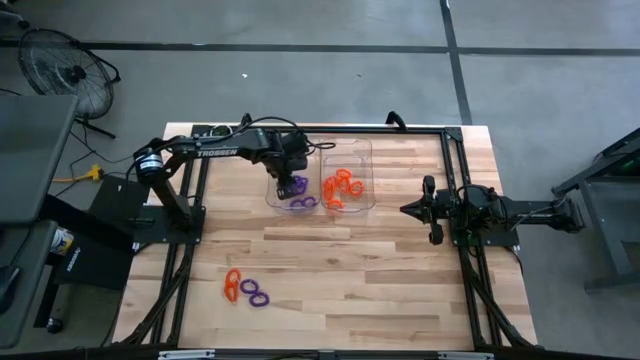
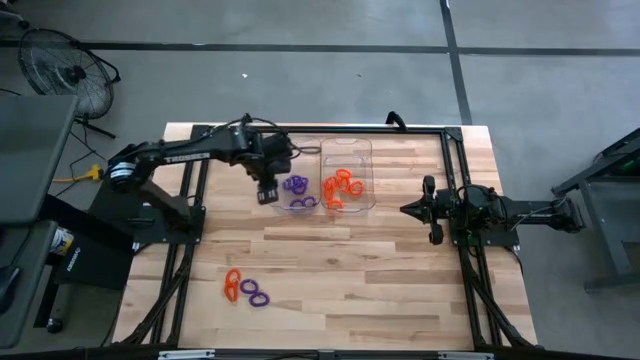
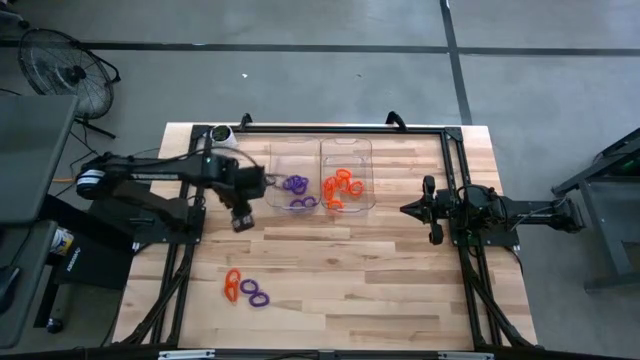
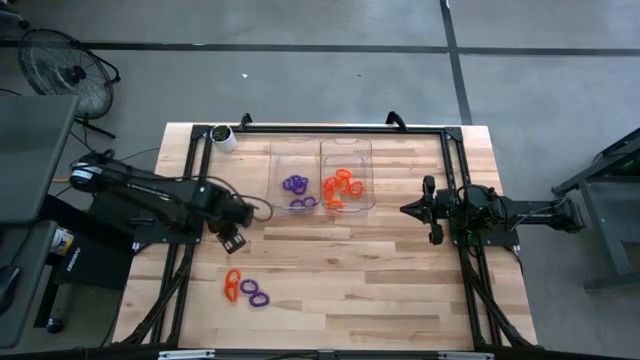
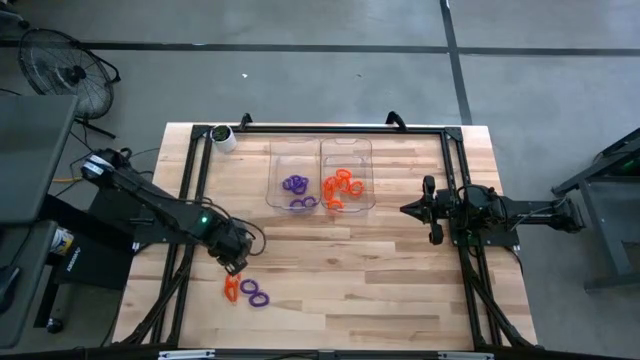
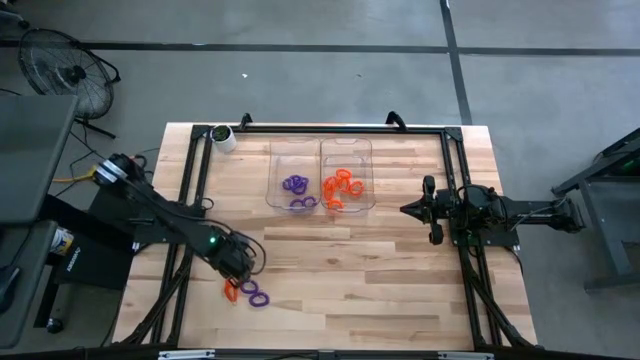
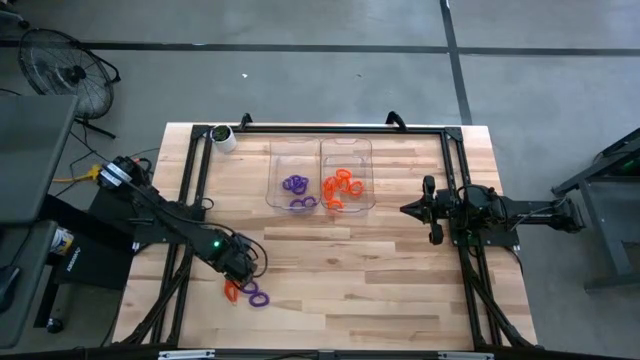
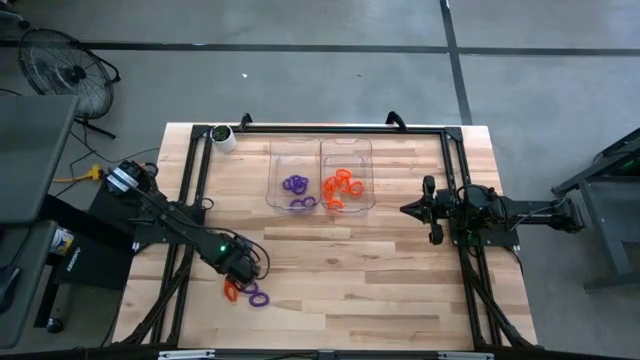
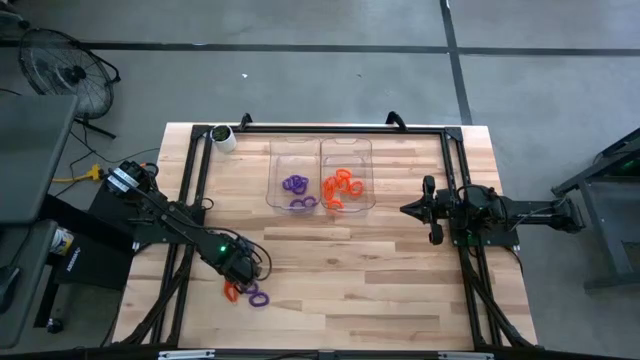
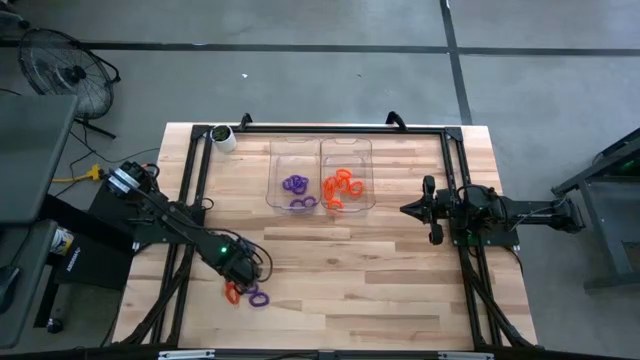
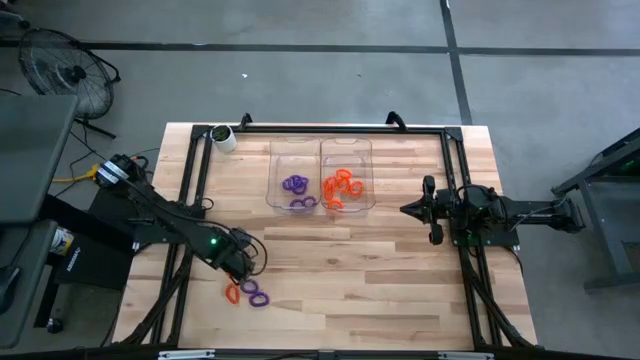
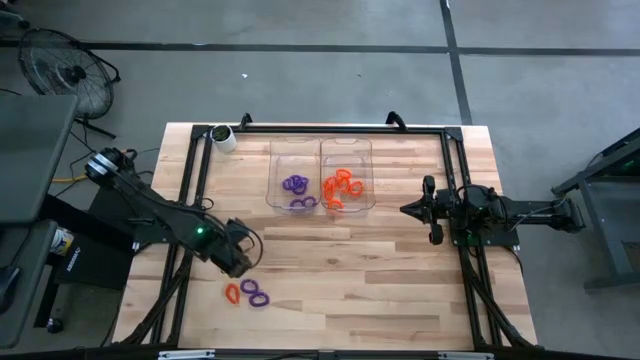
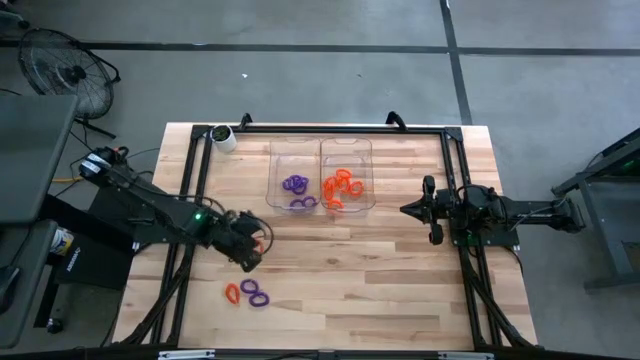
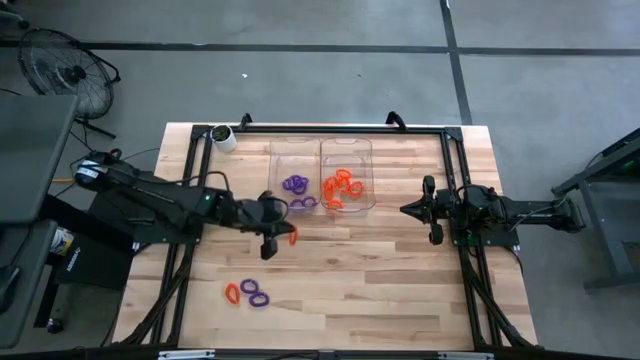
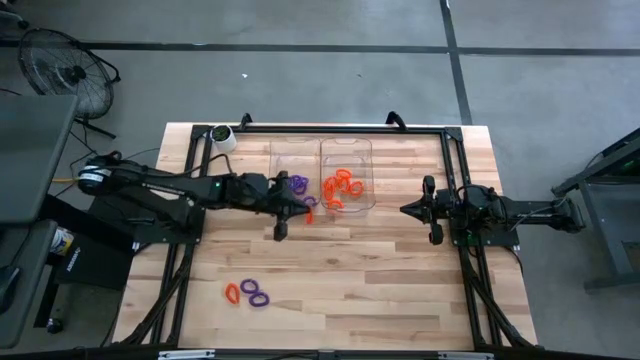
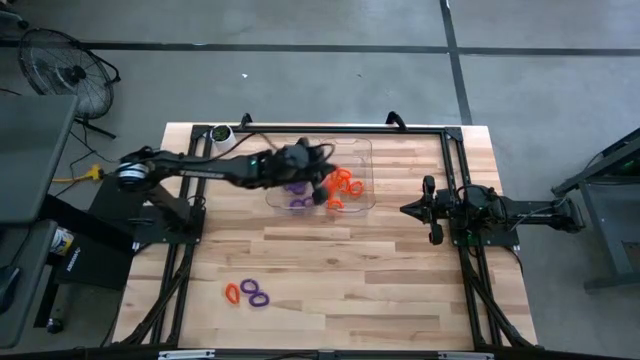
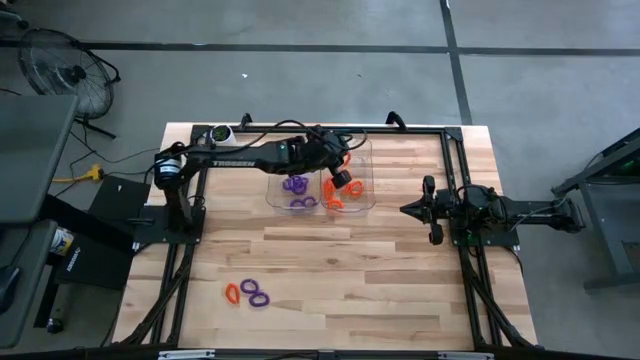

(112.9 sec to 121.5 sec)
Task: Sort spring keychains
Put the orange spring keychain into the right transparent bin

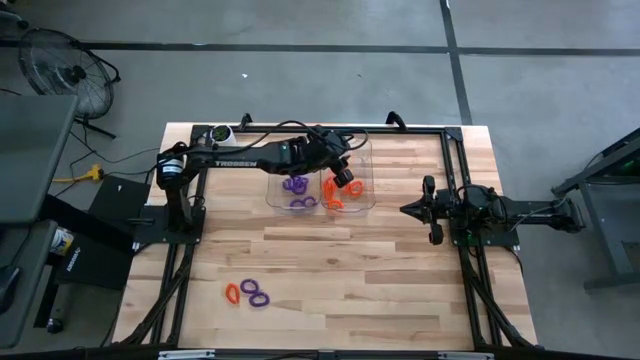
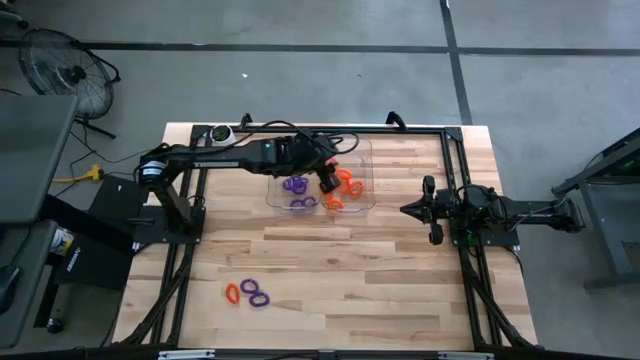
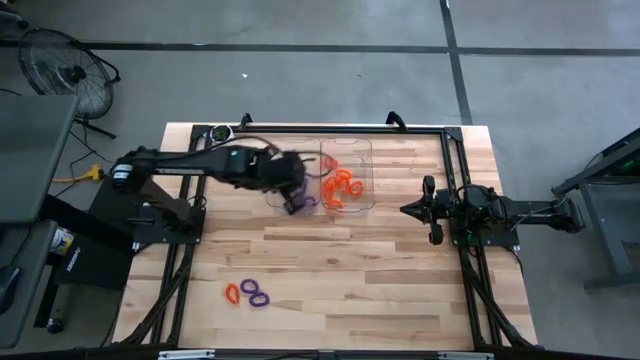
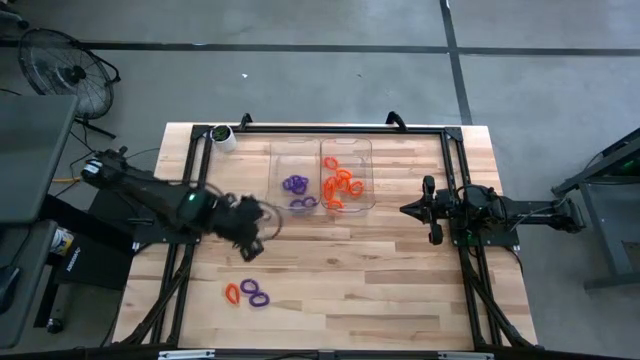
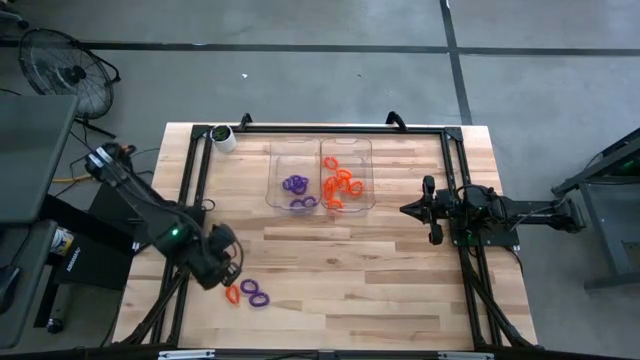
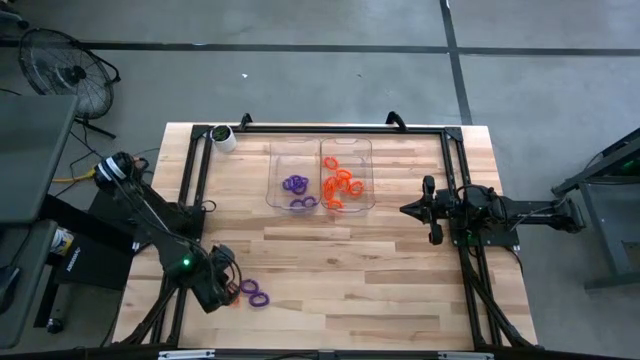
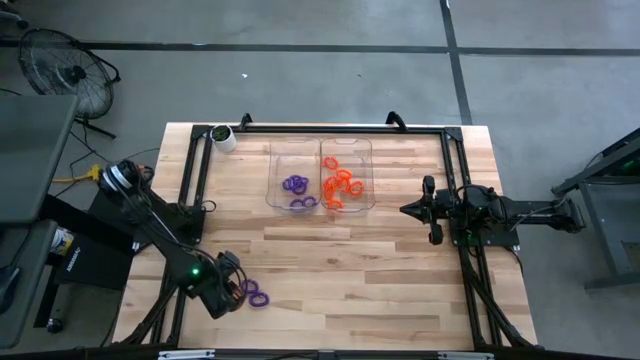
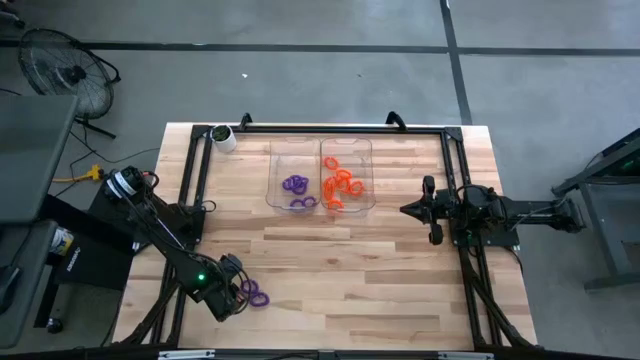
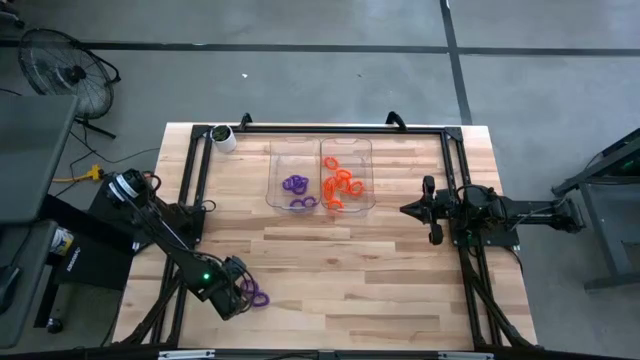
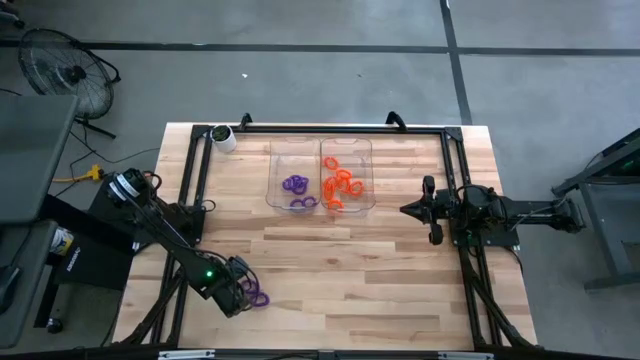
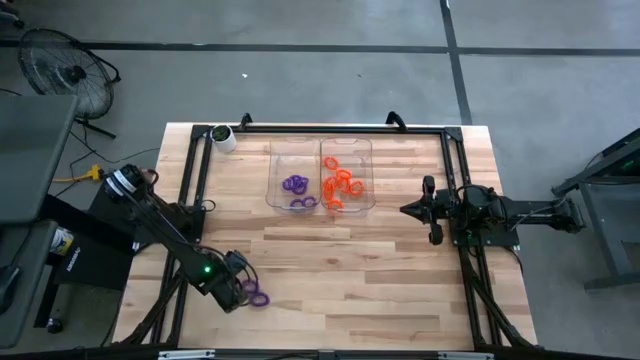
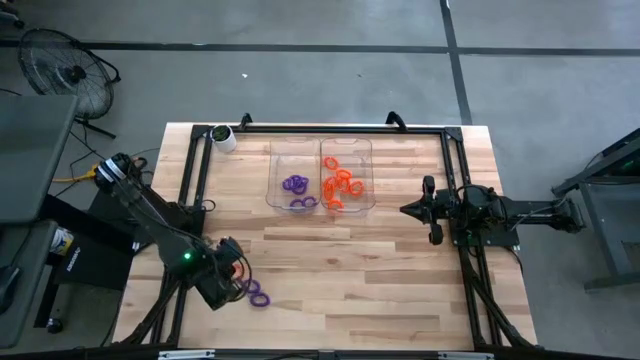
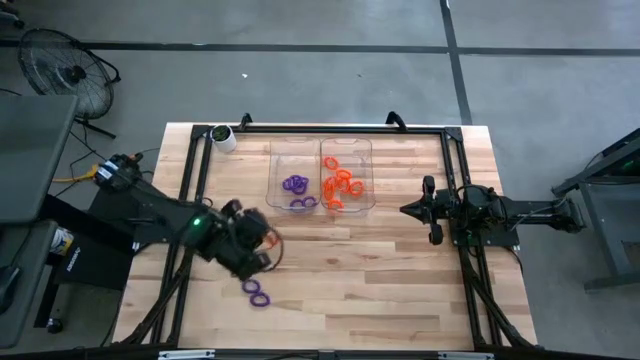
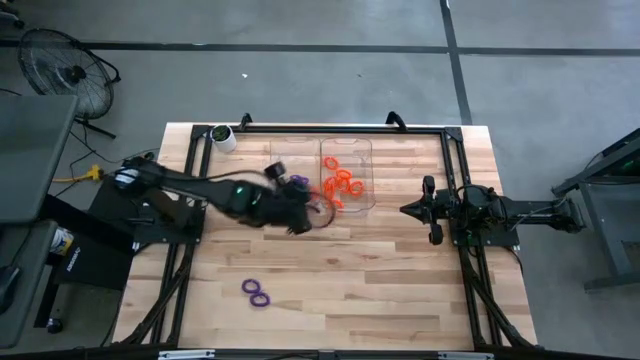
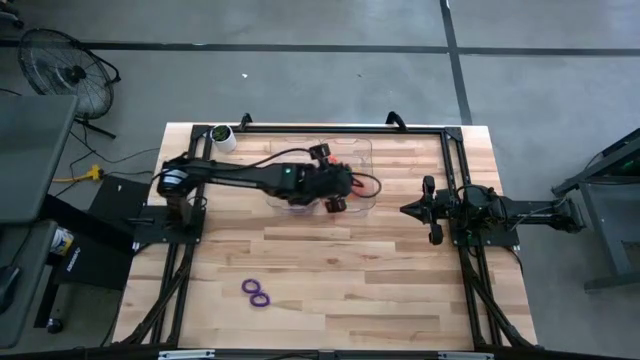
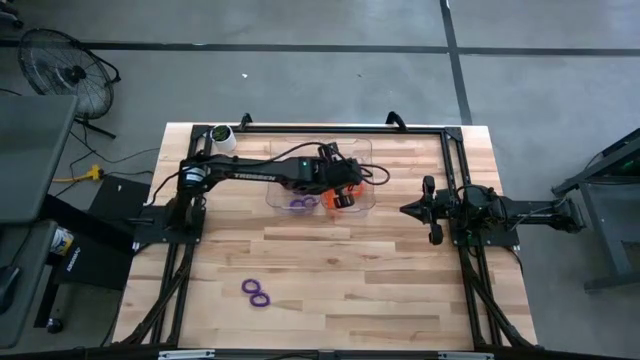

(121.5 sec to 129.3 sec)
Put the orange spring keychain into the right transparent bin

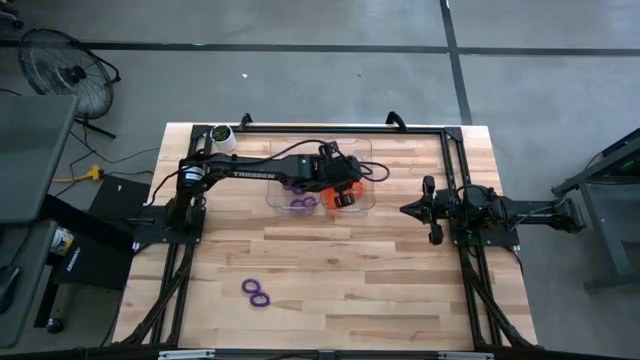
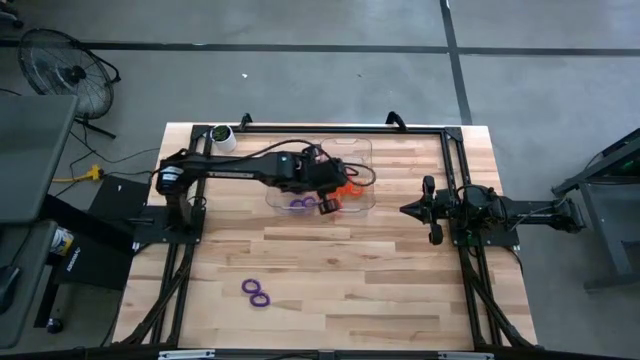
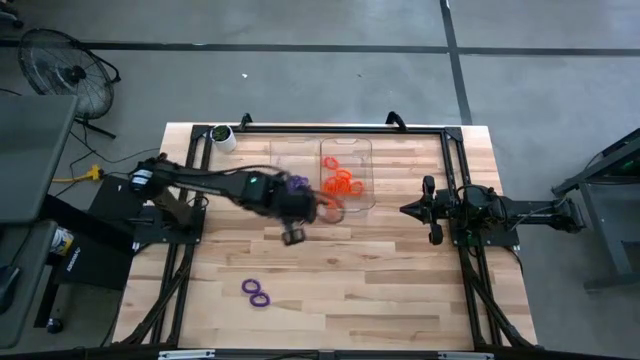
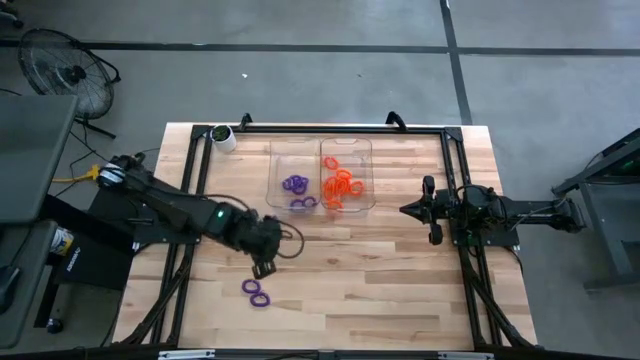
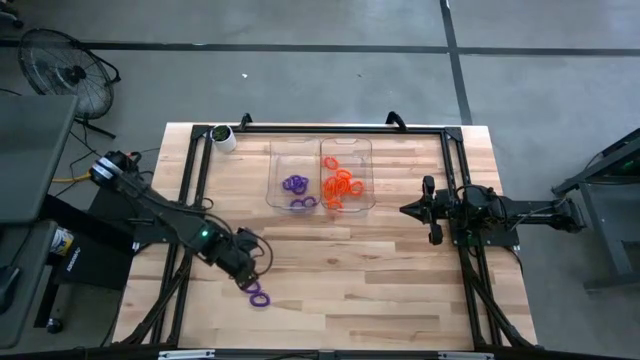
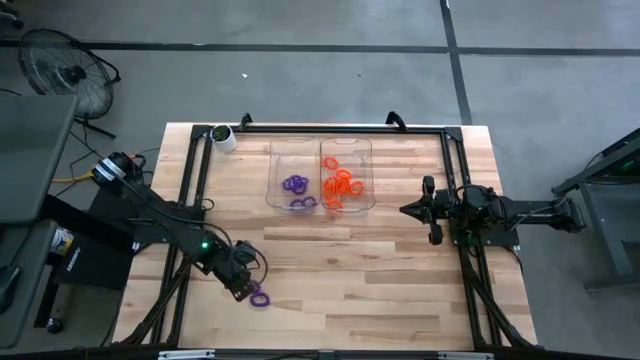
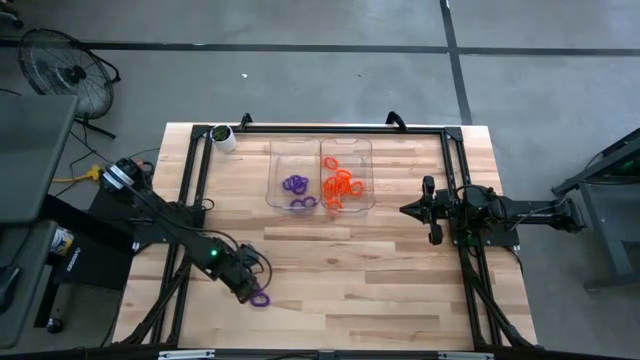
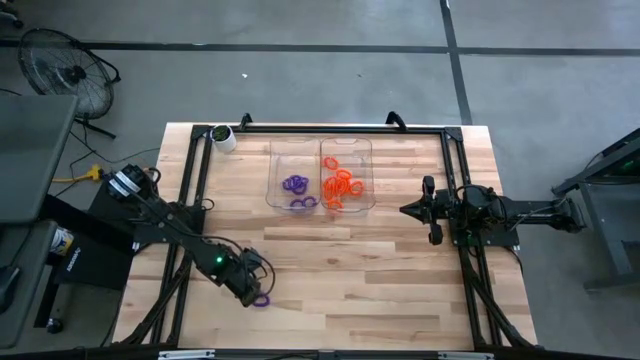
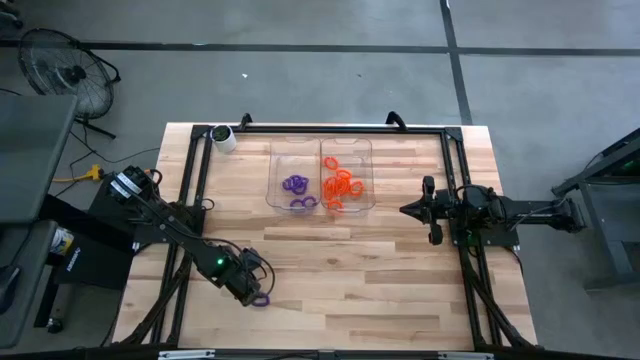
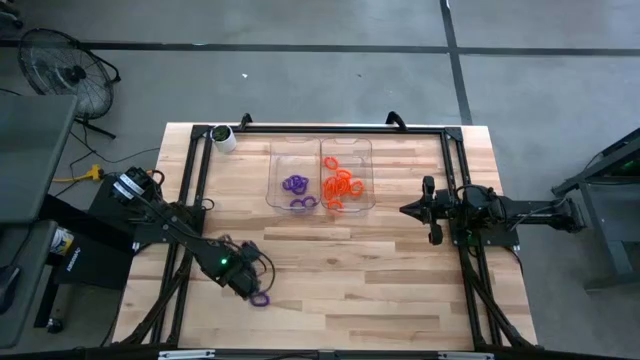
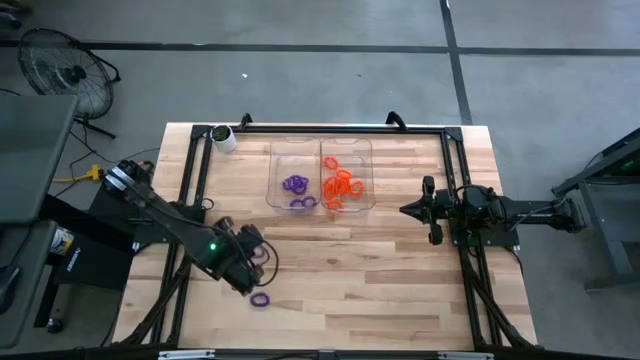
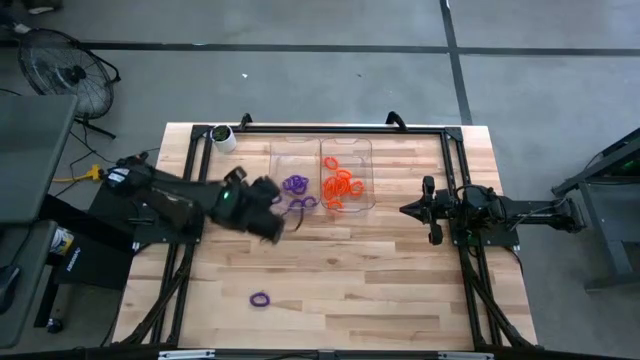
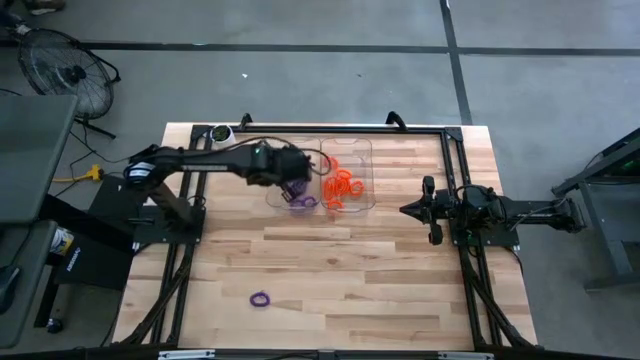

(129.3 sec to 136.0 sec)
Put the purple spring keychain into the left transparent bin
